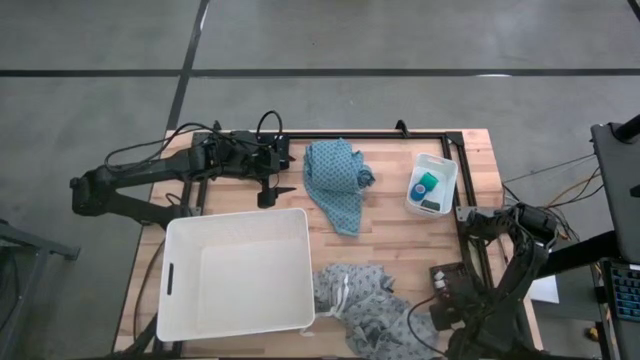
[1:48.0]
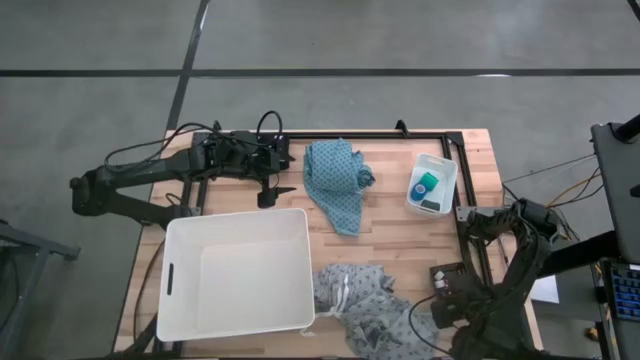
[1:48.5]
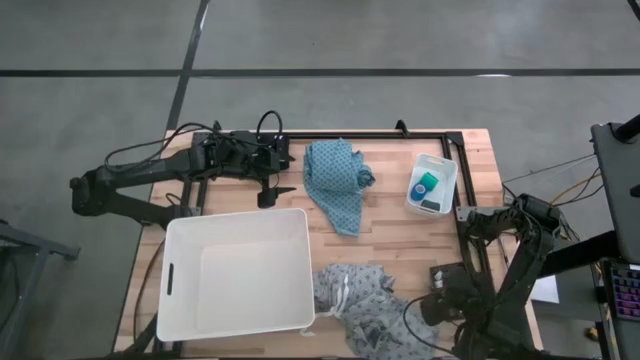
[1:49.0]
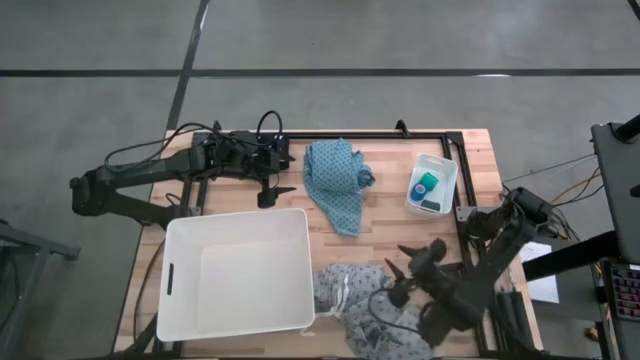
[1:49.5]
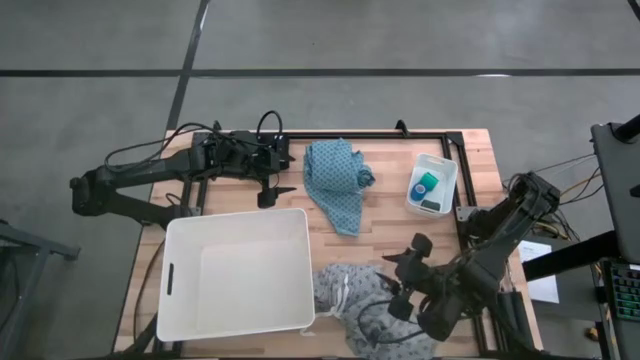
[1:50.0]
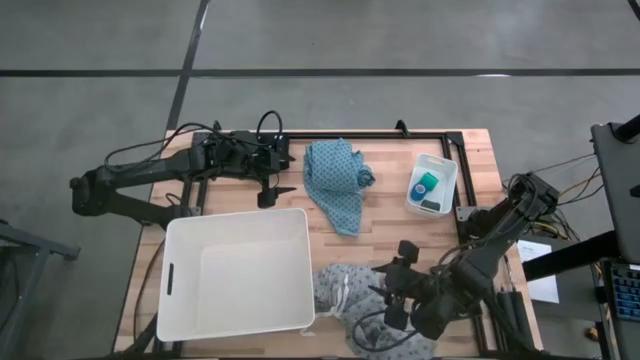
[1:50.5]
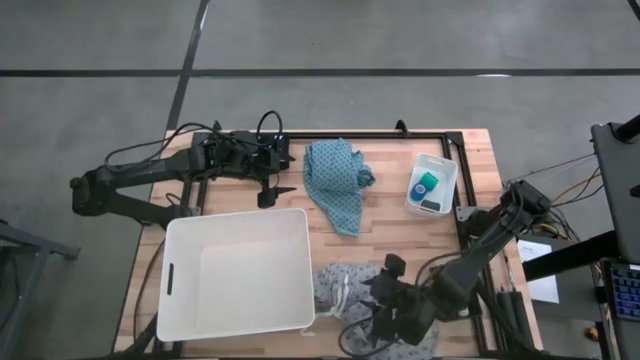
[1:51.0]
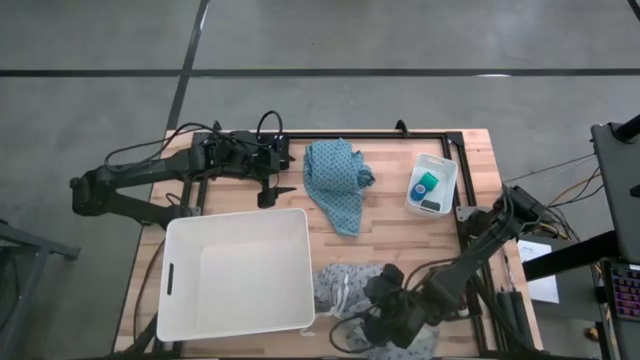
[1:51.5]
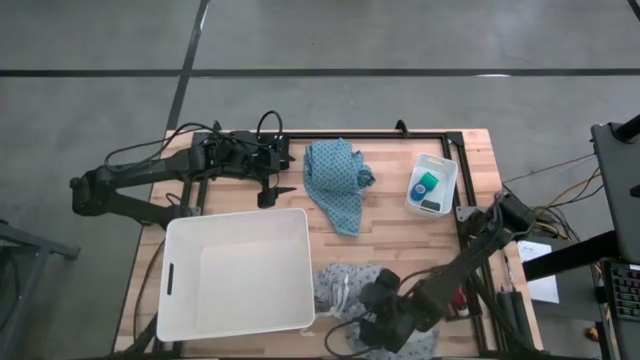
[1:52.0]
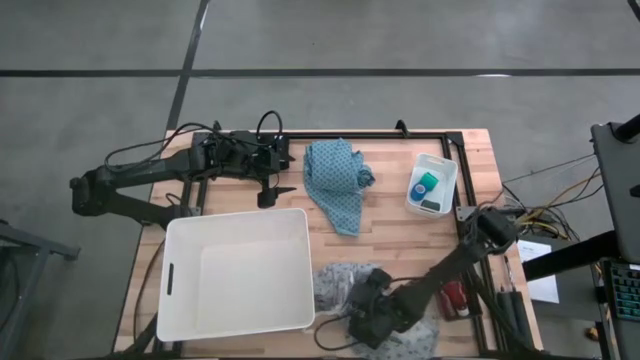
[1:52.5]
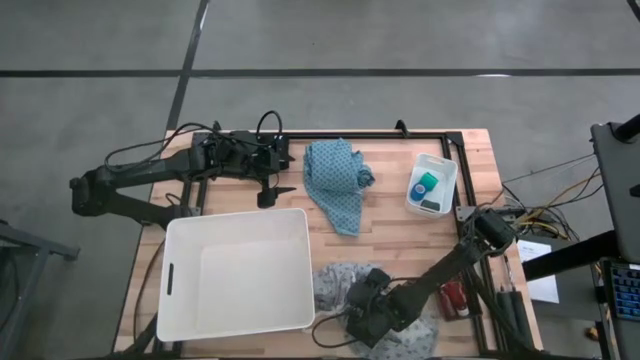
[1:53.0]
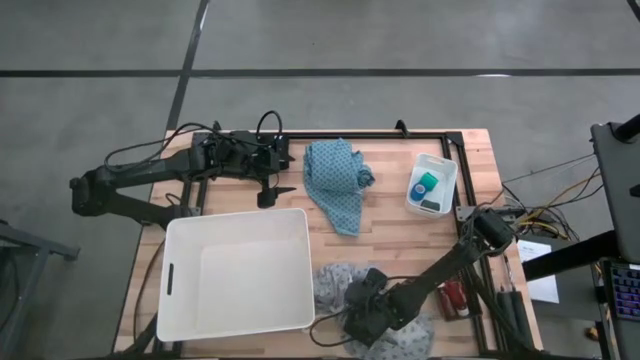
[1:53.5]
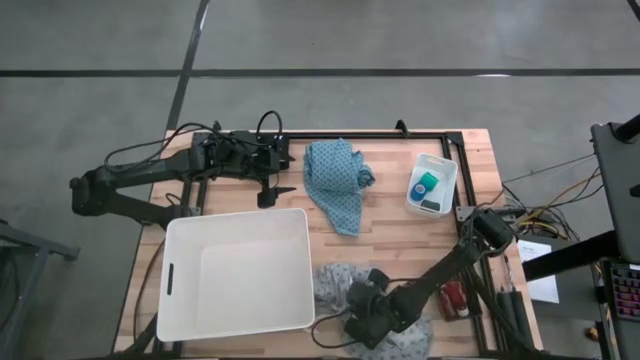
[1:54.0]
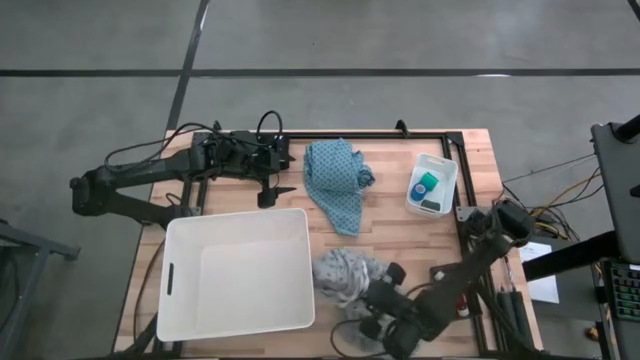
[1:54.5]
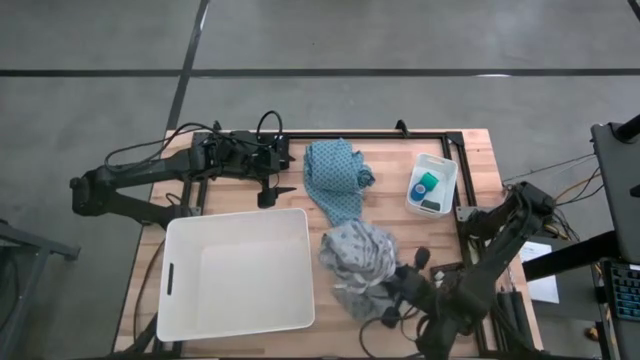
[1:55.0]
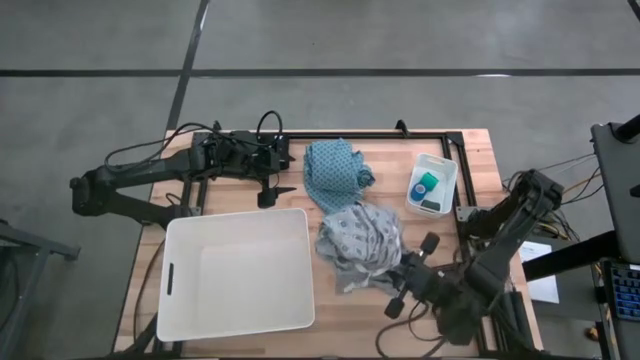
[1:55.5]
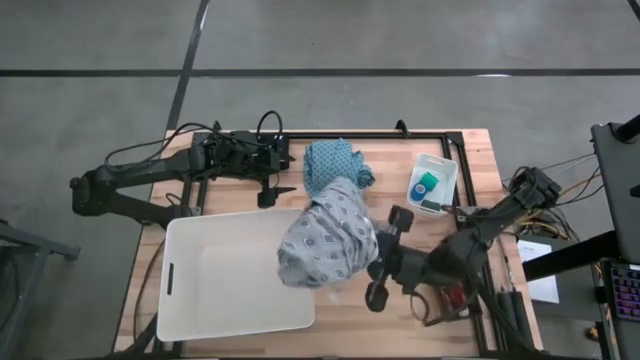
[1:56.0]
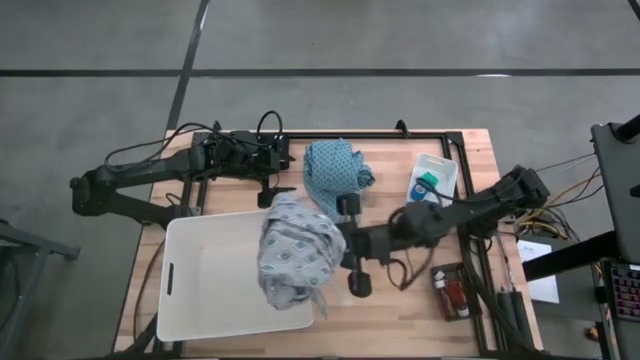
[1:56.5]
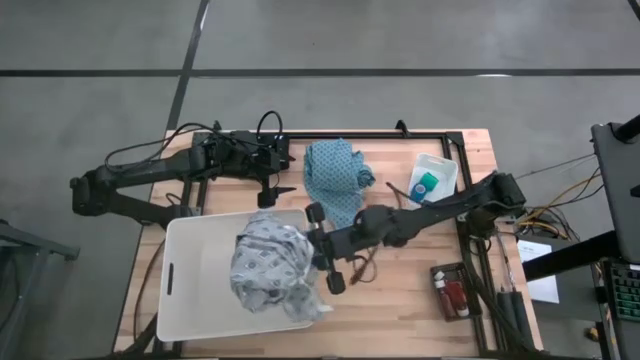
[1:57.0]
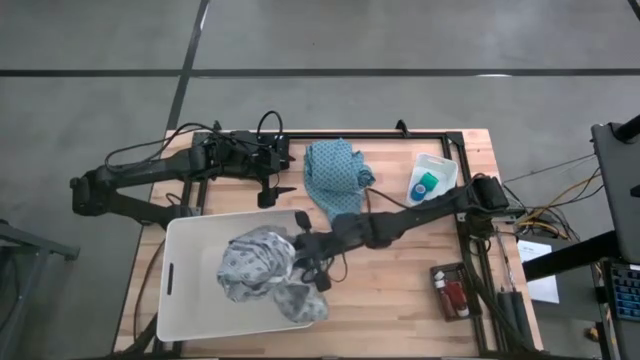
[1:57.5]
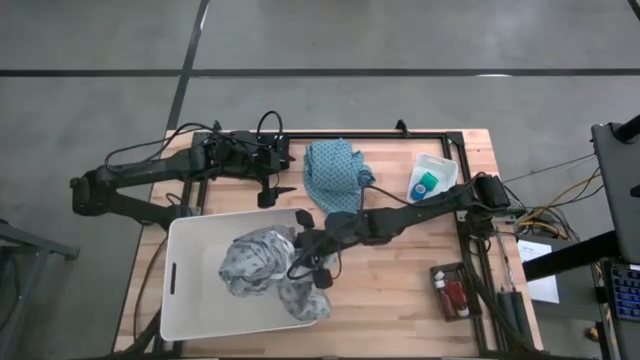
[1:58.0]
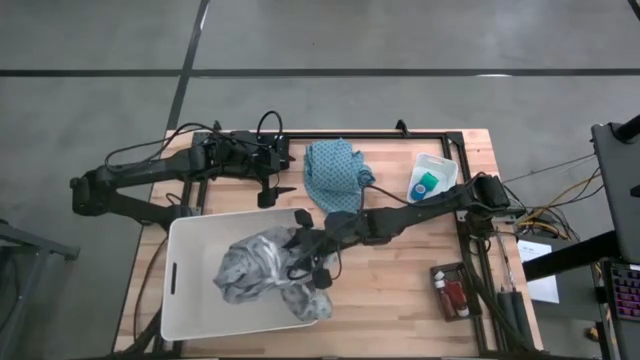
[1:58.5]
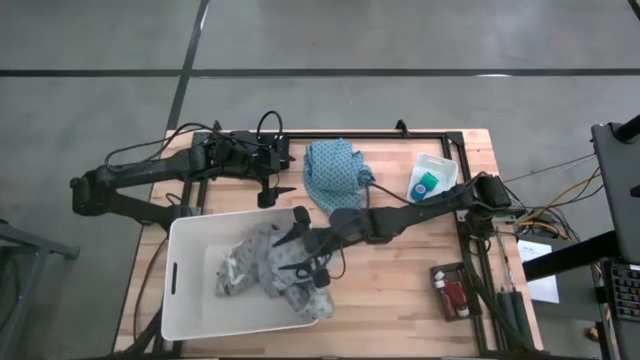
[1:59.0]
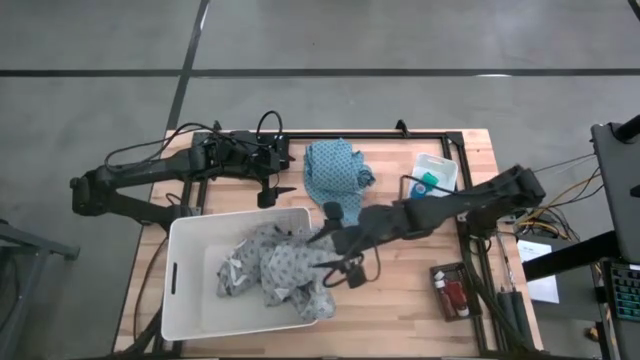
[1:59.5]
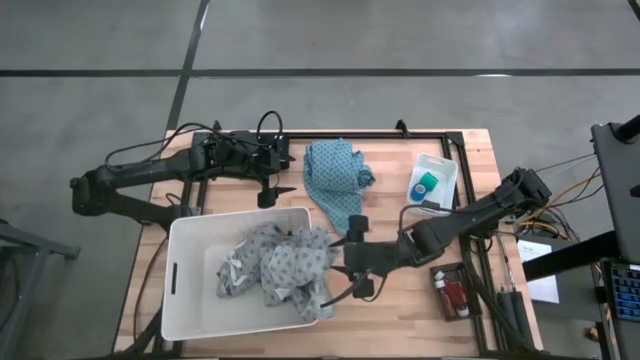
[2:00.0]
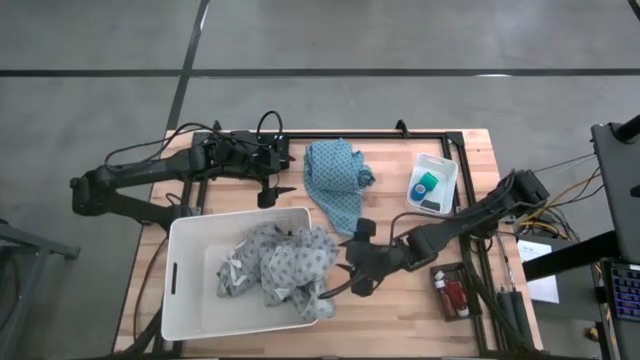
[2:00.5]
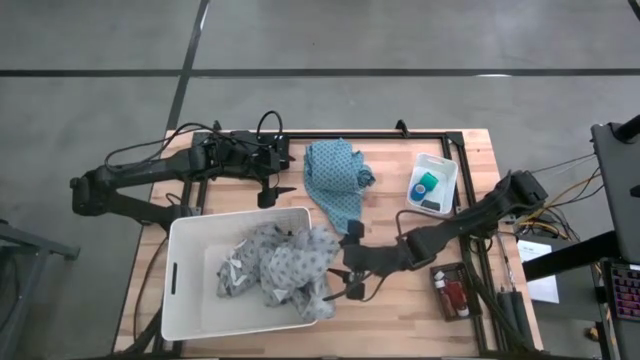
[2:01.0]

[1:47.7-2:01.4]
Task: Pick & Place Medicine items
Put the gray patient gown into the big white bin

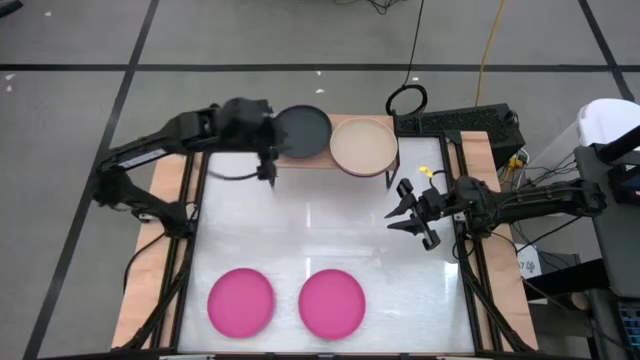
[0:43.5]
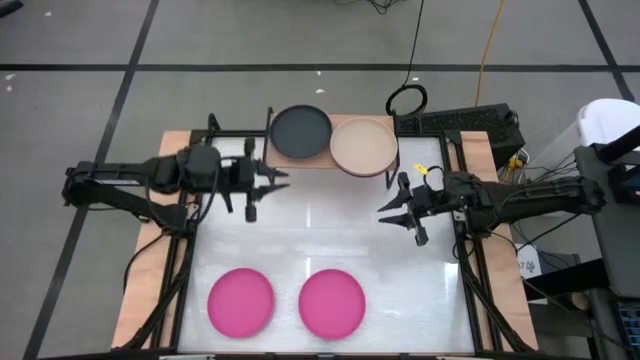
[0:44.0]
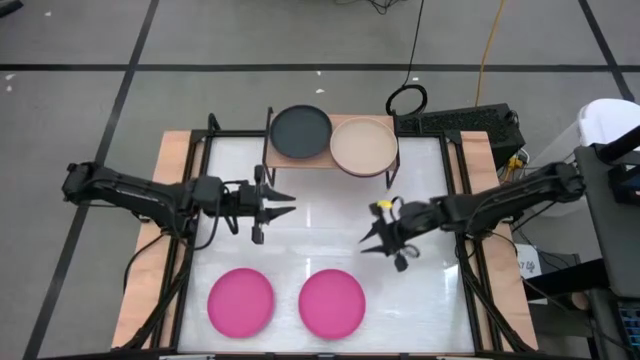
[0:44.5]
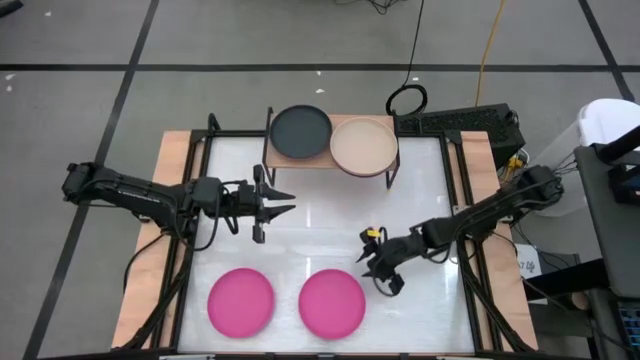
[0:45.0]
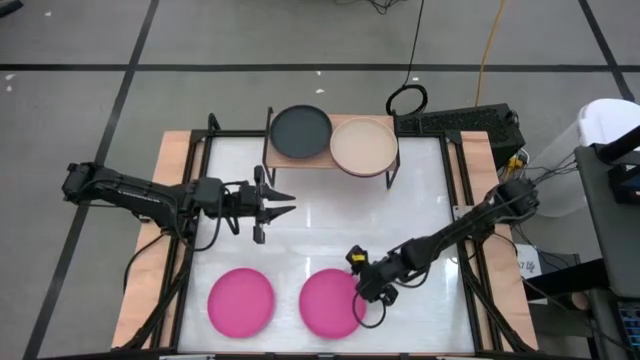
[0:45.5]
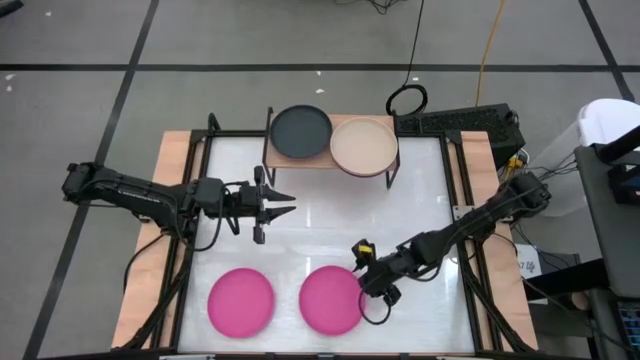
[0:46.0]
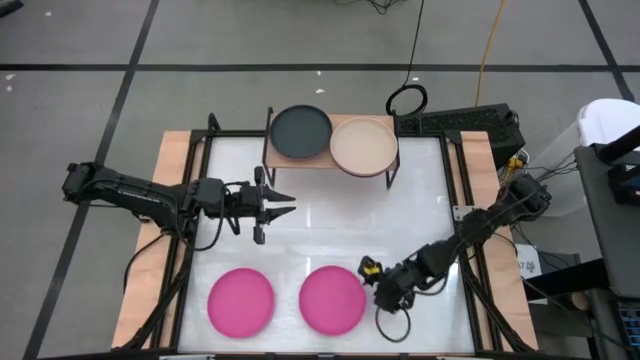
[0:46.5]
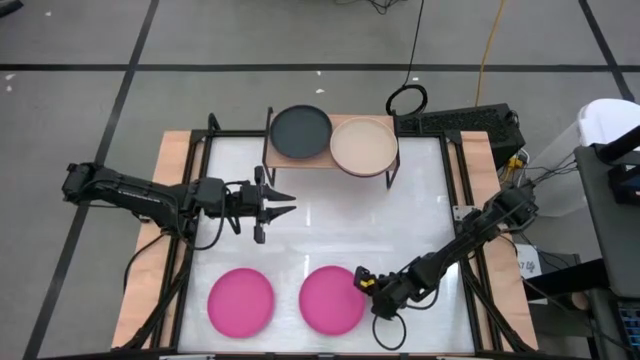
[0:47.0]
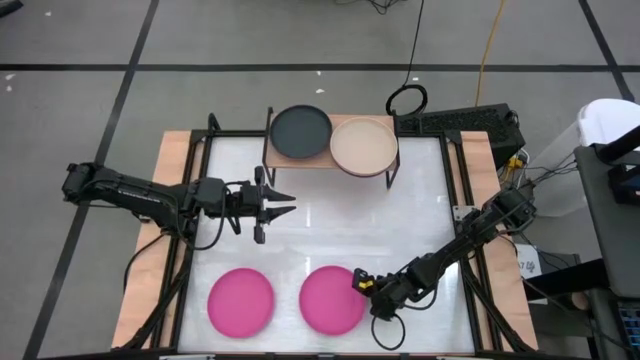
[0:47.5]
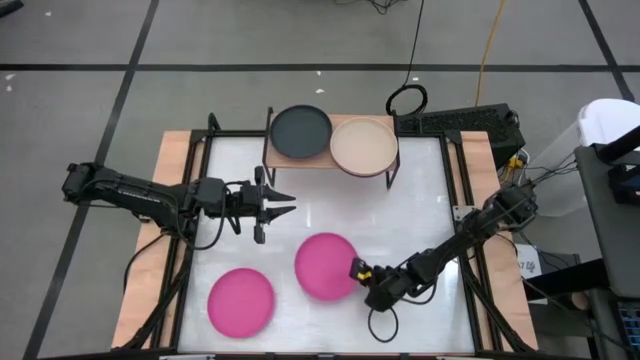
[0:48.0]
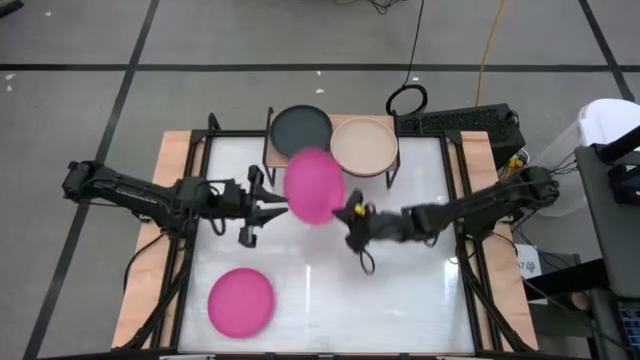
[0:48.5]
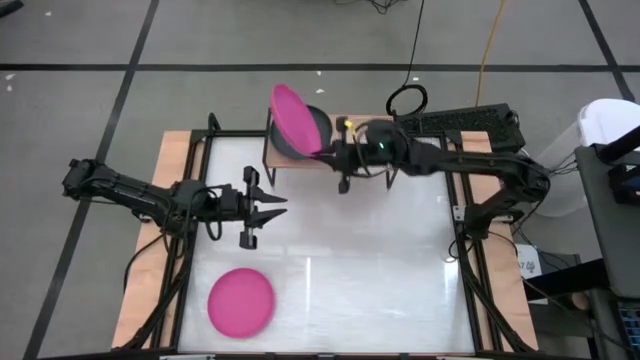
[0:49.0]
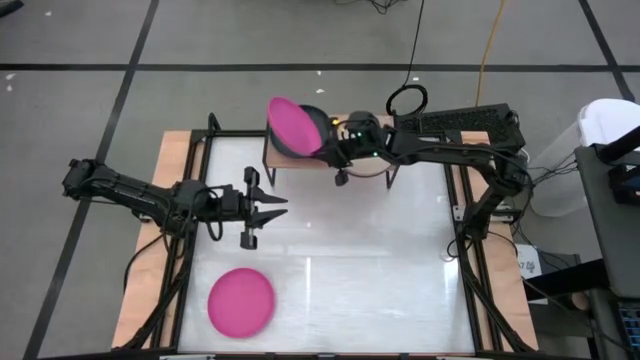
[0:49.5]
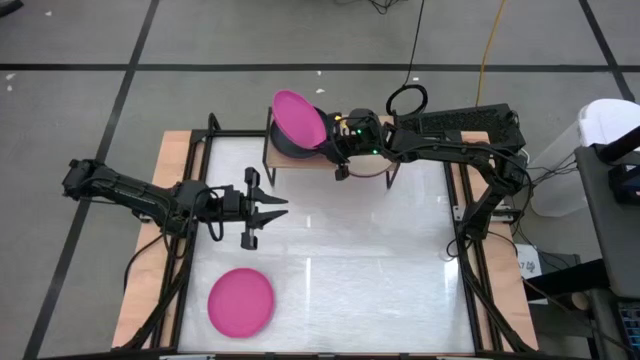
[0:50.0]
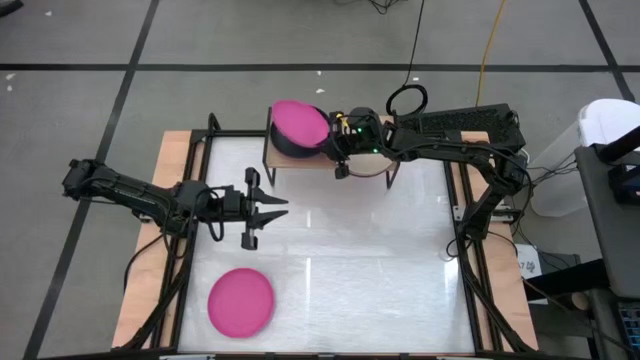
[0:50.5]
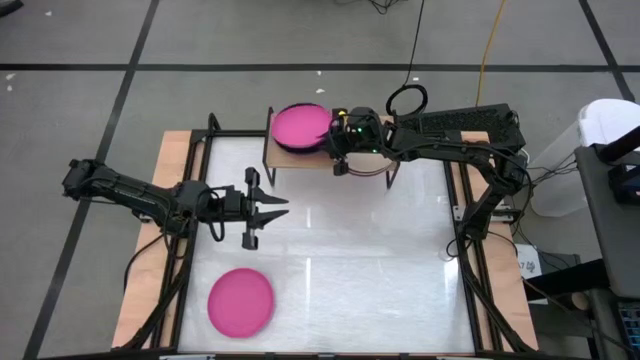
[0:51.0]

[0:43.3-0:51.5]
Task: Place and stack plates onto a shelf
Stack the right pink plate on top of the black plate on the shelf
